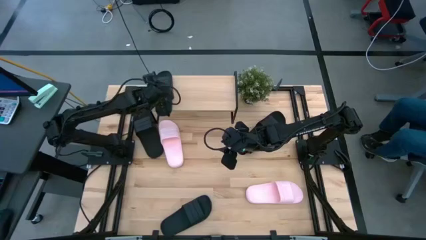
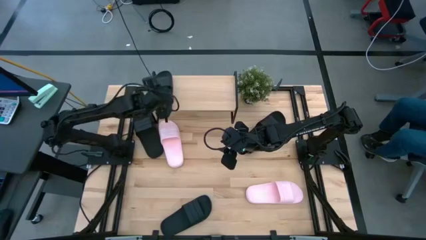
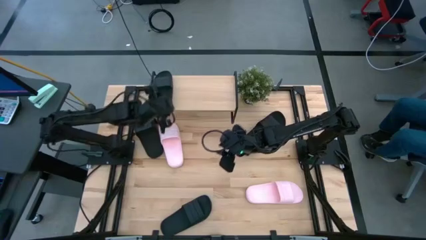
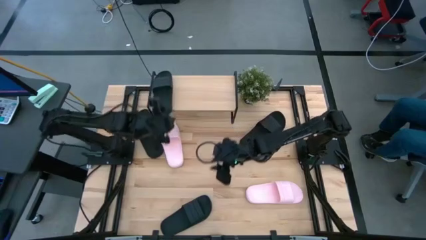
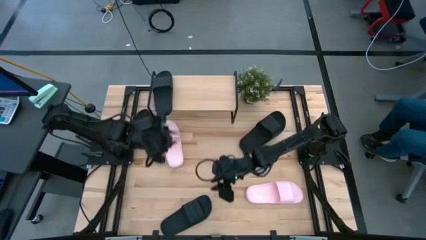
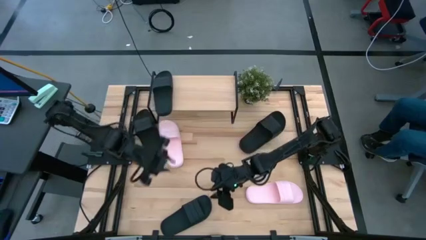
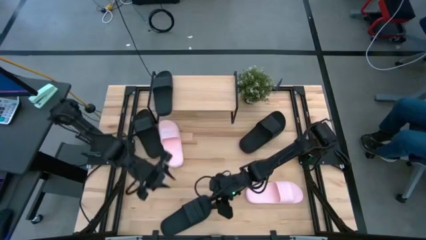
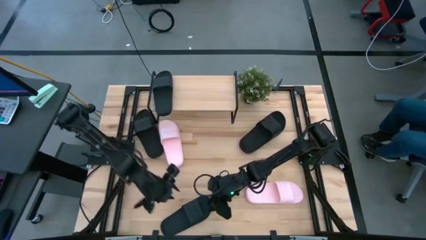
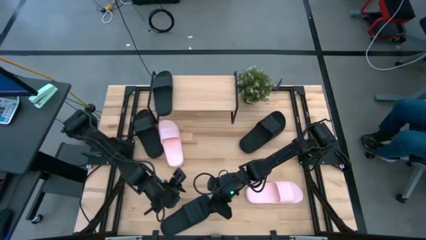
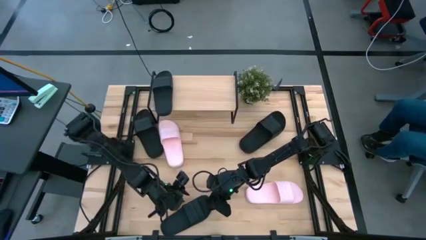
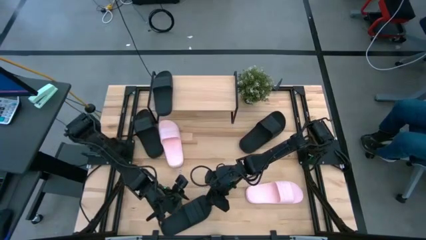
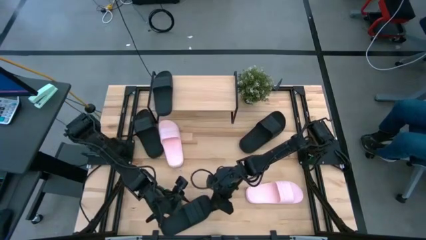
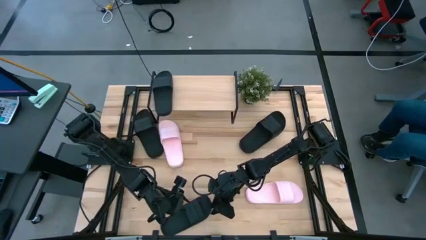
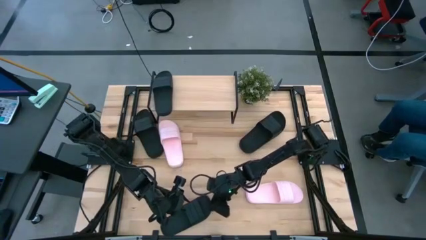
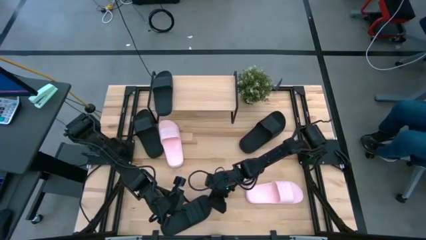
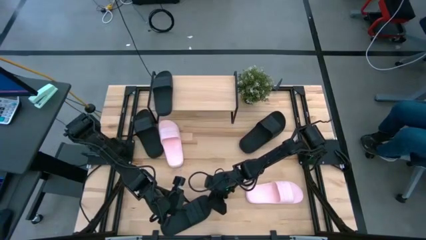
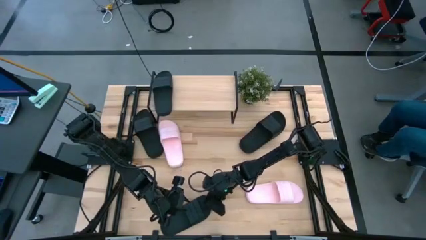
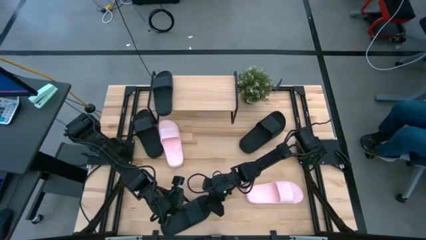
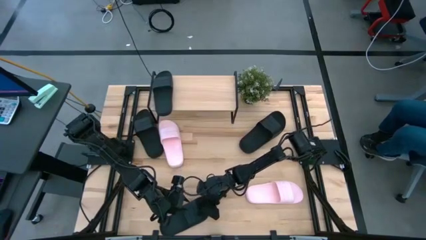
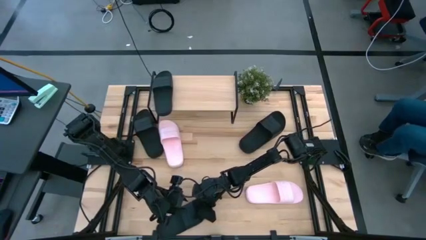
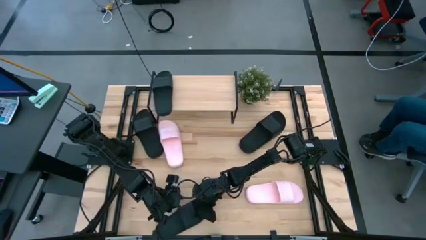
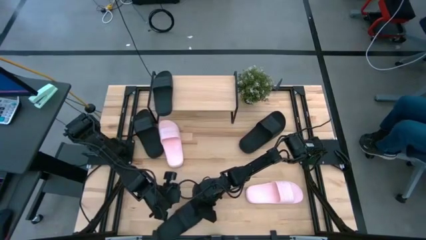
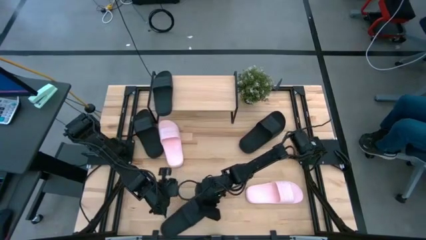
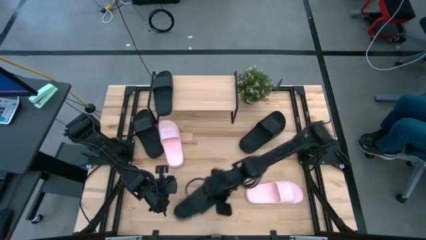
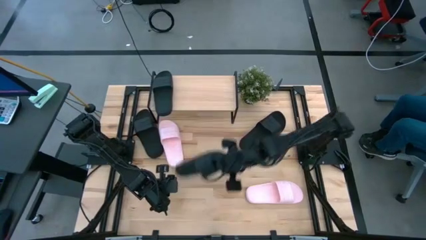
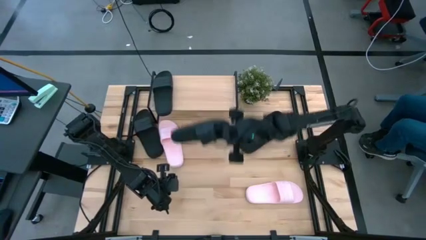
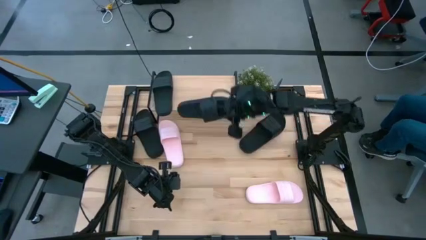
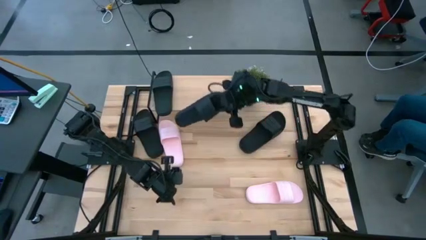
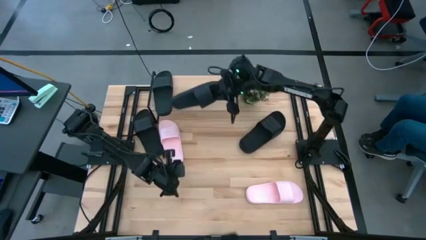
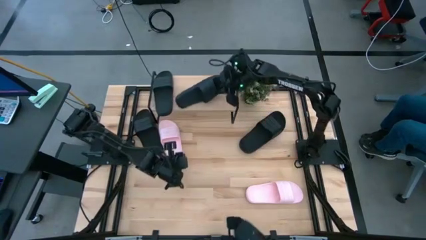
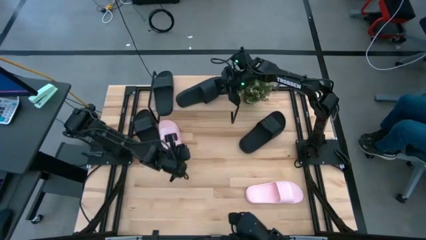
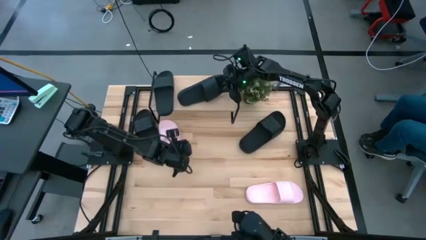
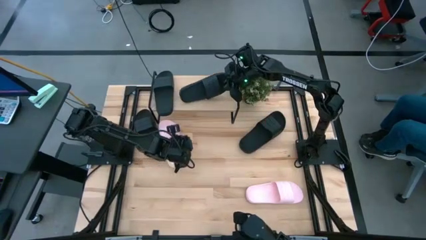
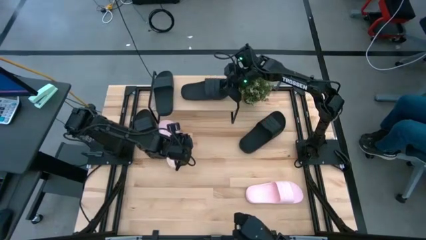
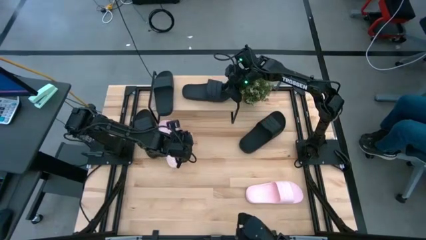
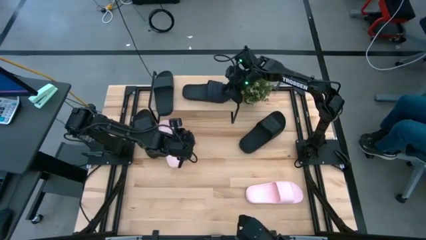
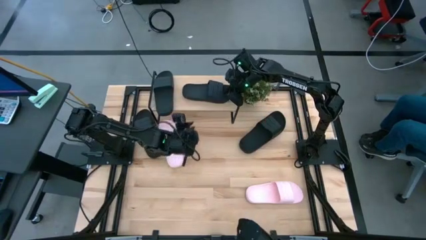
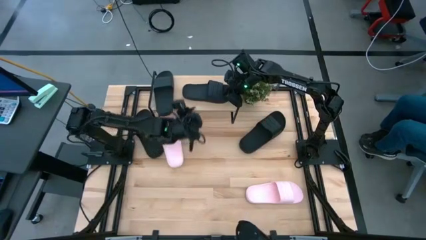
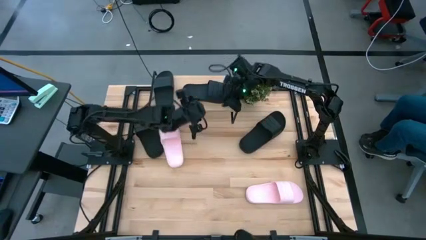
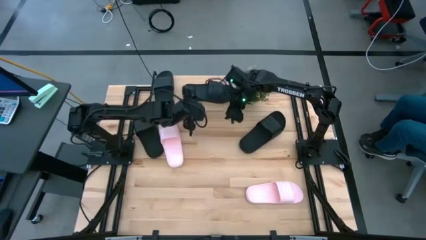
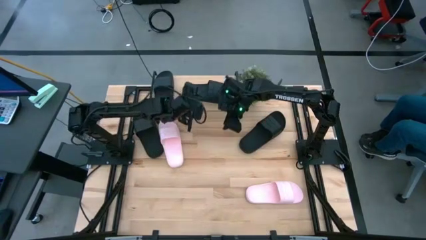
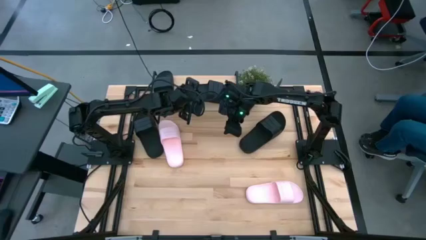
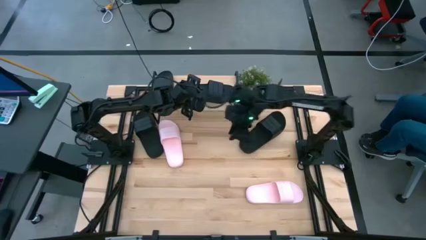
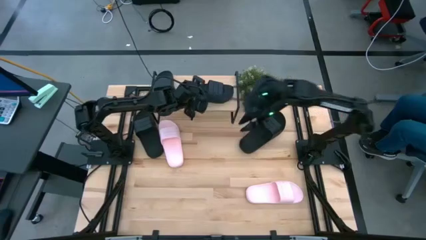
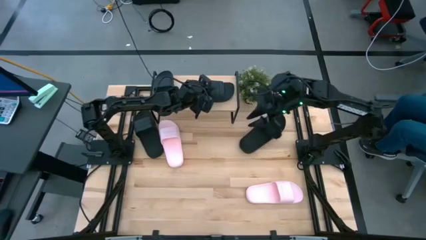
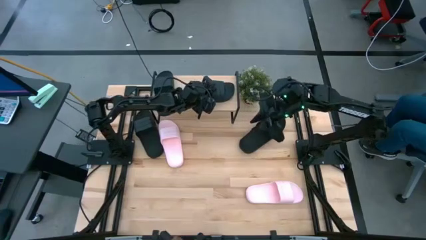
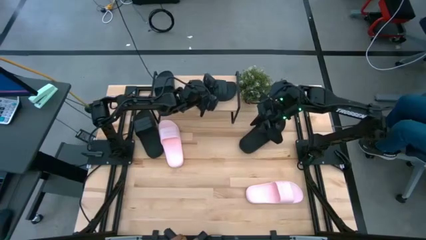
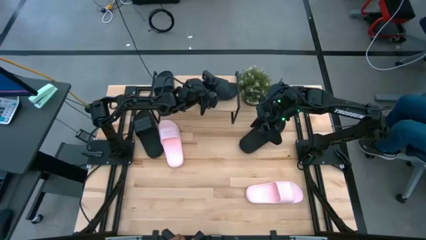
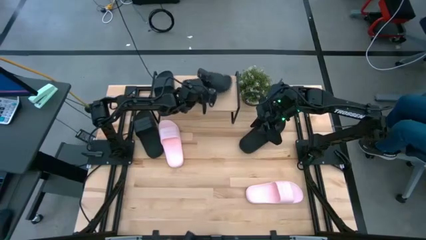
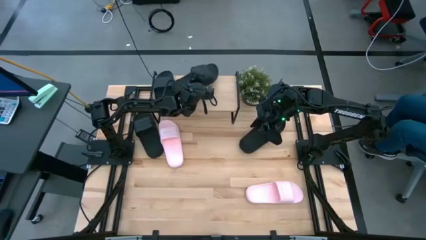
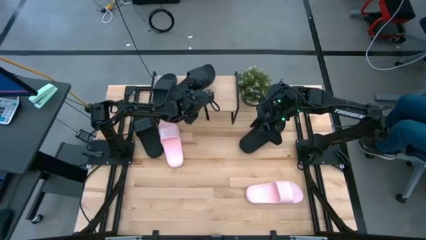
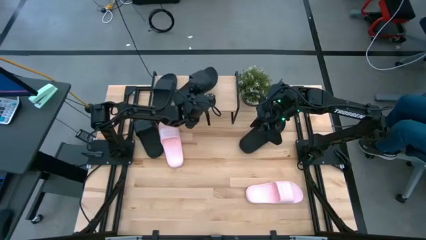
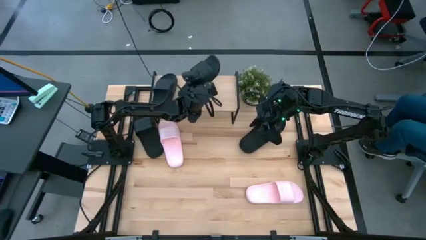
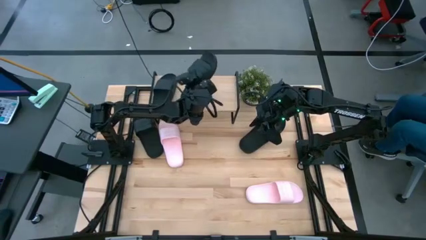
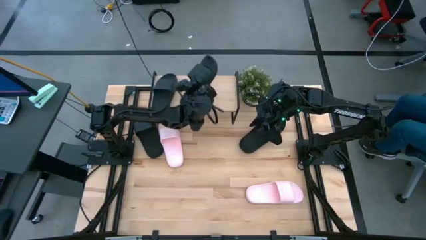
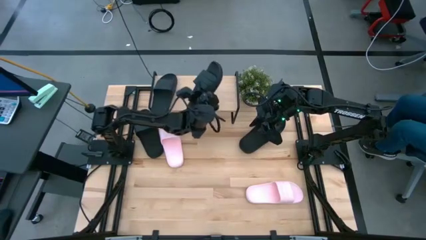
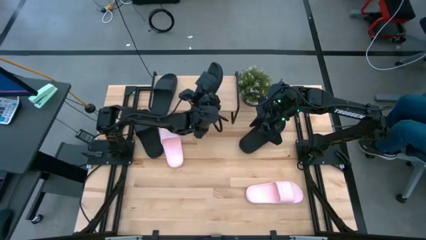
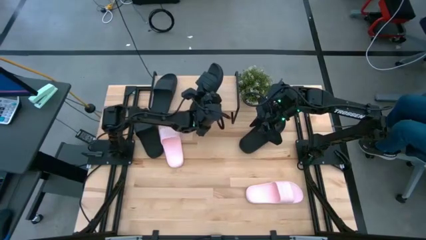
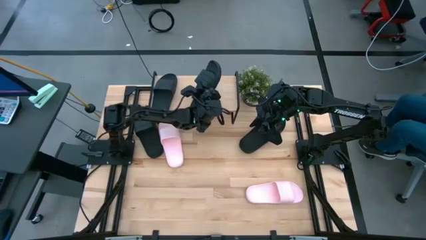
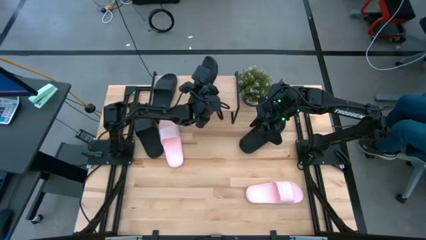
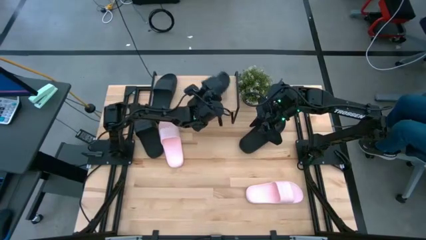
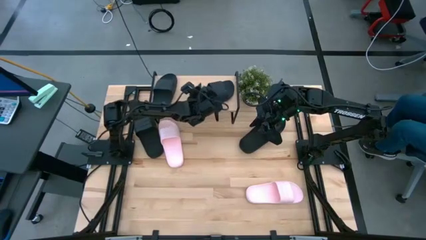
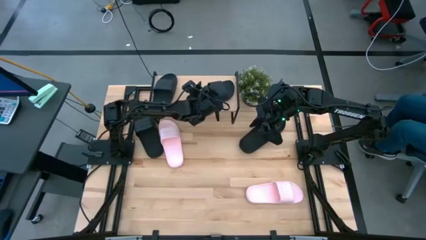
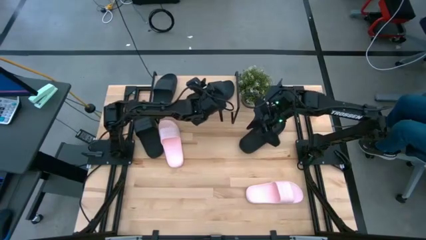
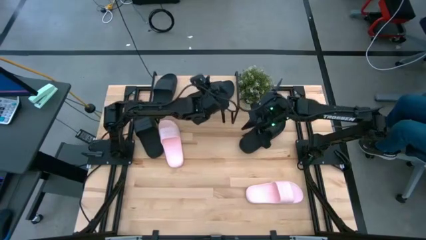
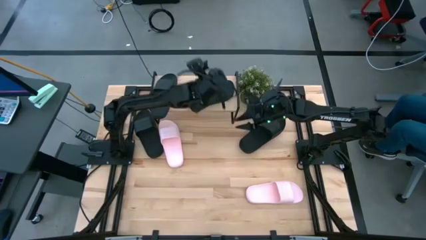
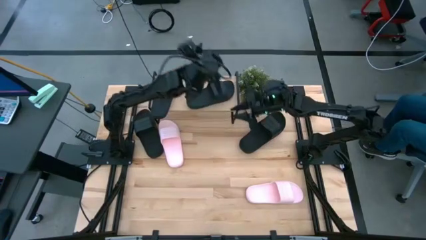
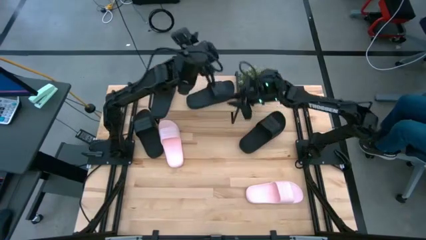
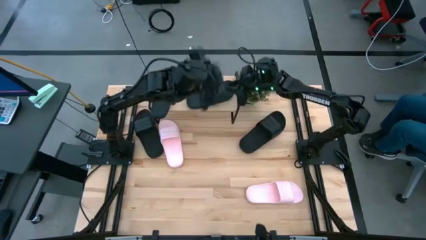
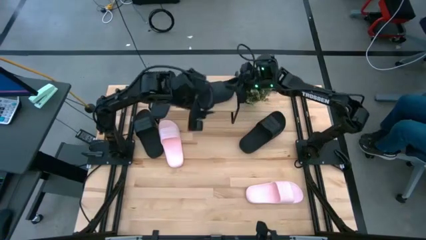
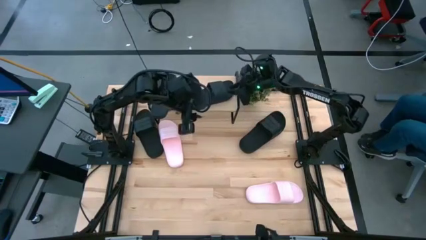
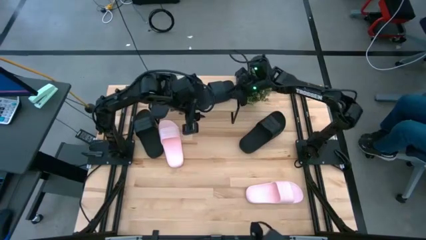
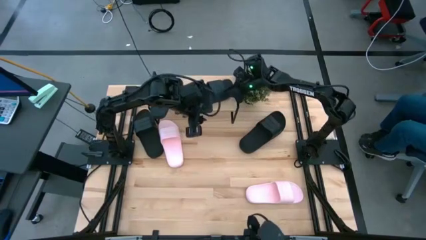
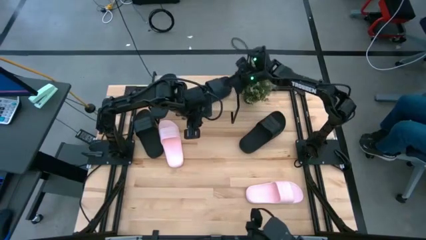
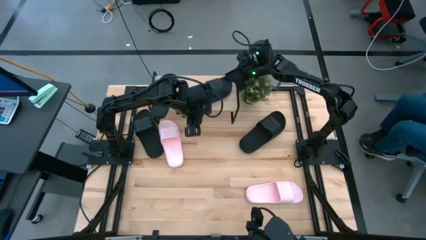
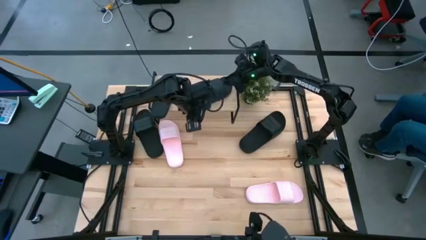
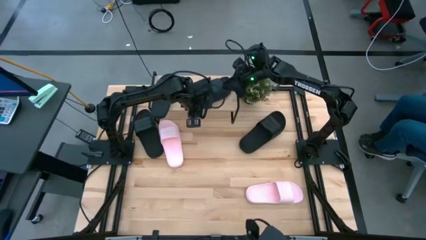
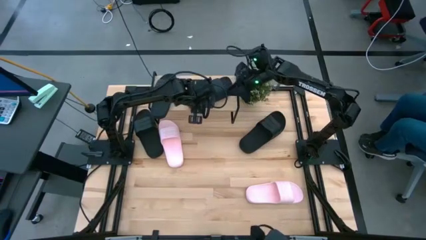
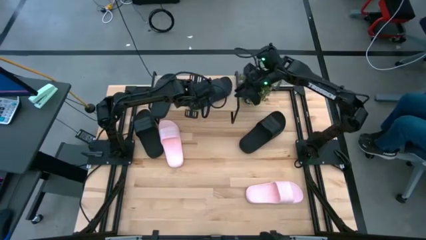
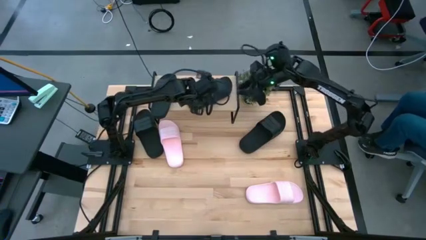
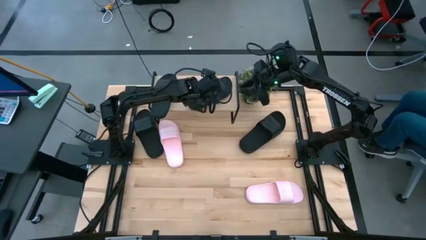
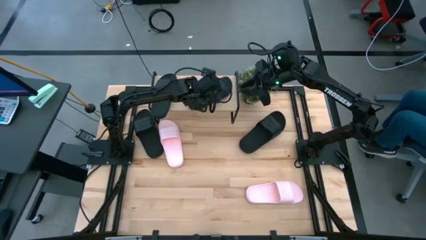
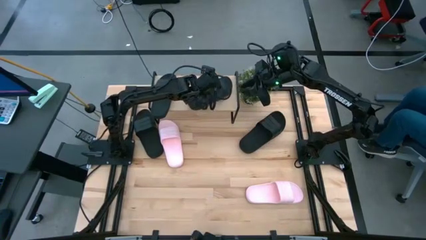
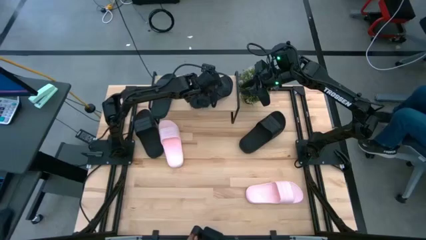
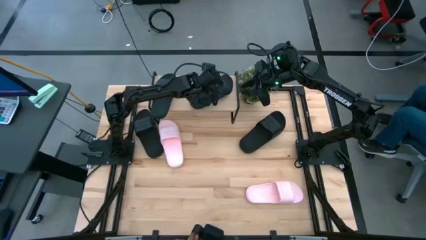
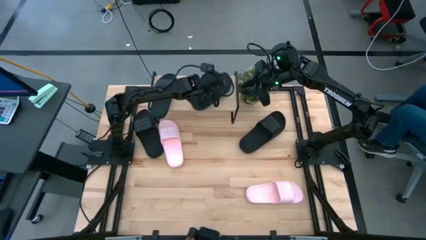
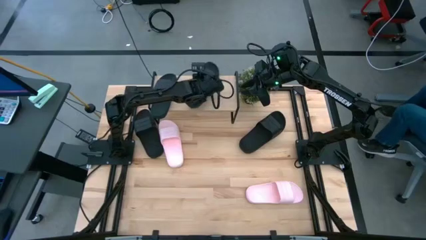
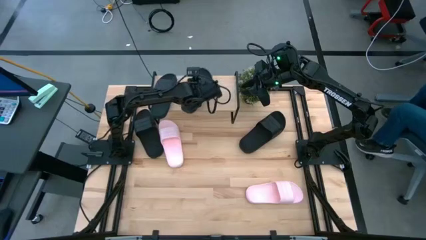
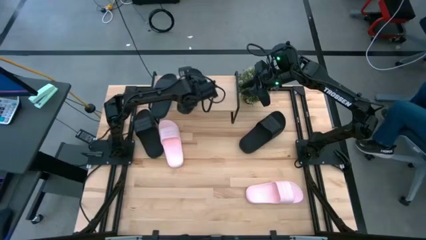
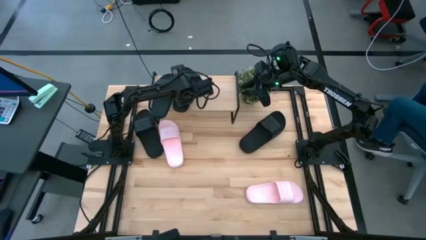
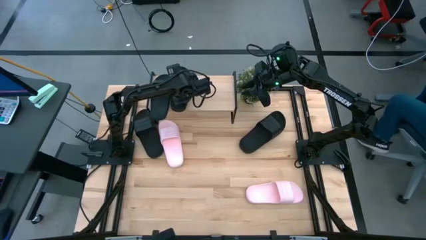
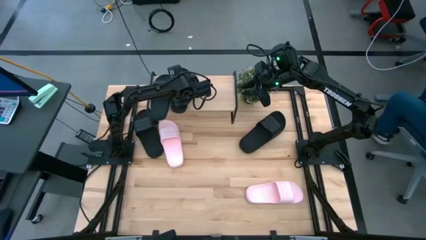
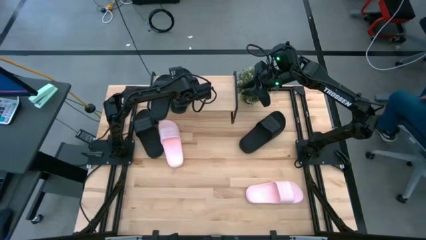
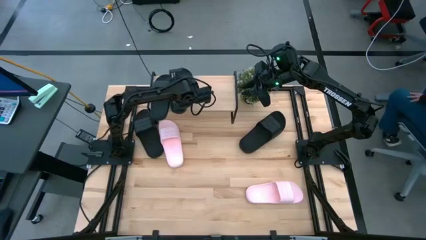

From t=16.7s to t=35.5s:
Task: Pick and place slides into the shelf
Put the bottom left black slipper on the shelf
